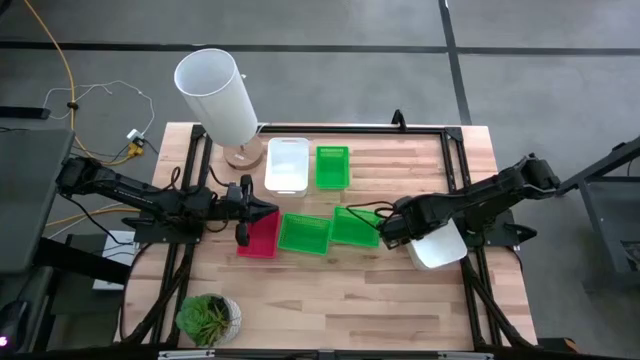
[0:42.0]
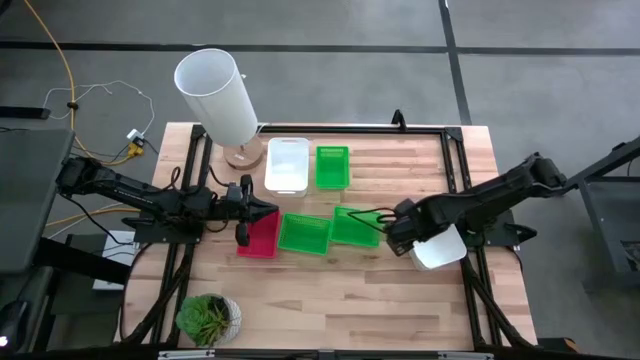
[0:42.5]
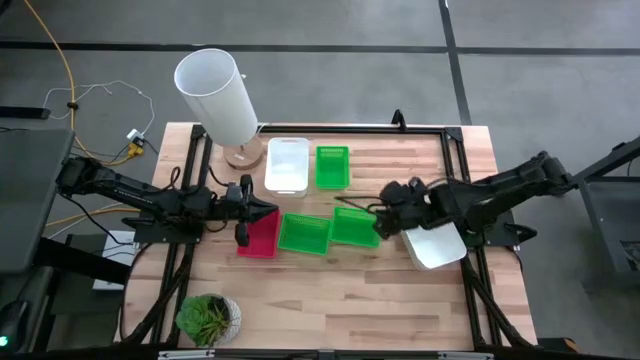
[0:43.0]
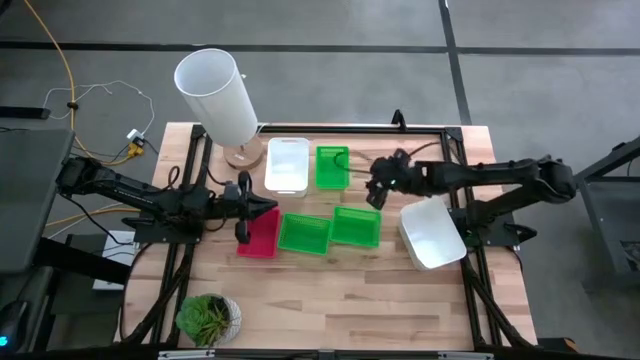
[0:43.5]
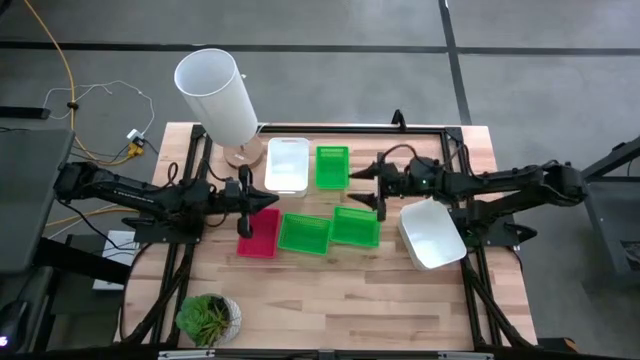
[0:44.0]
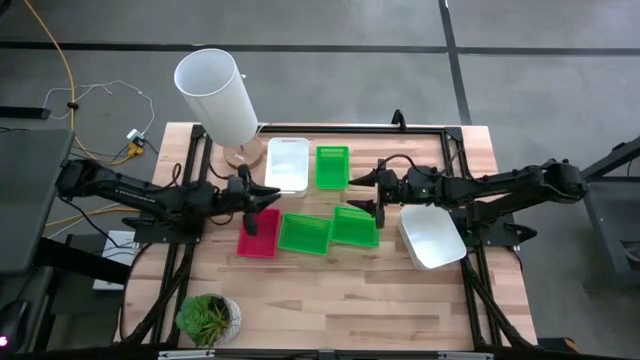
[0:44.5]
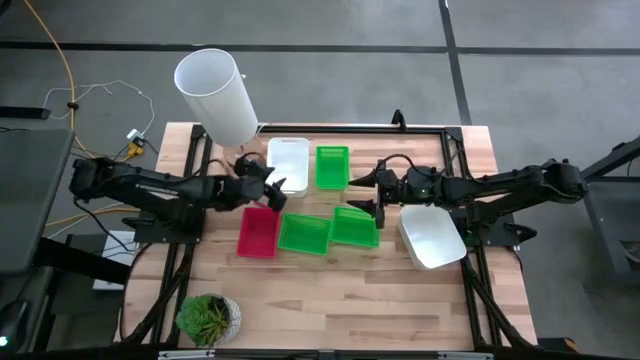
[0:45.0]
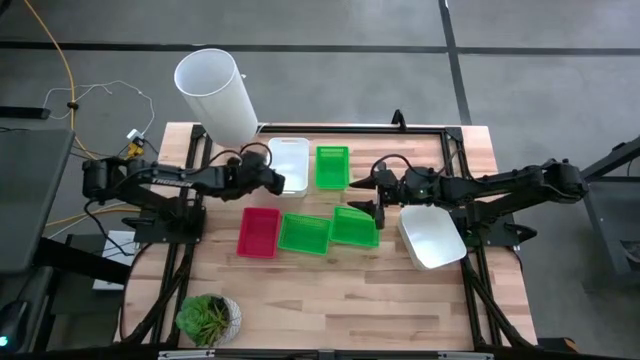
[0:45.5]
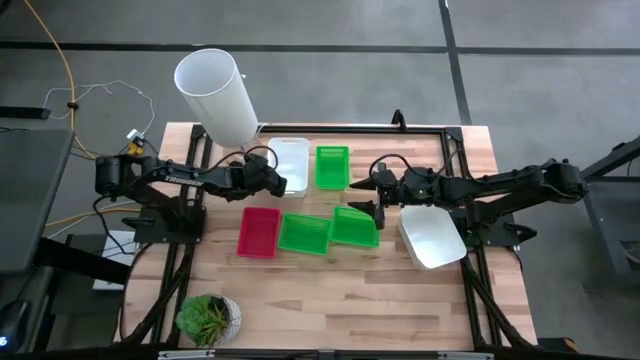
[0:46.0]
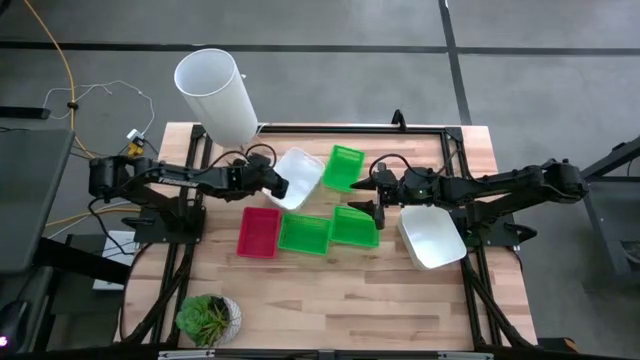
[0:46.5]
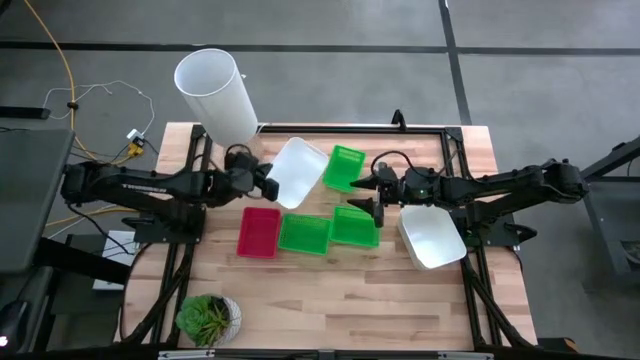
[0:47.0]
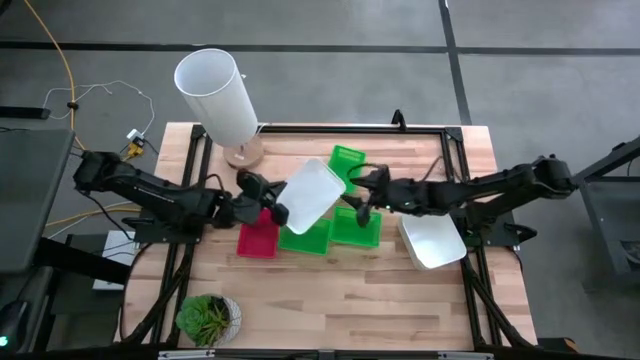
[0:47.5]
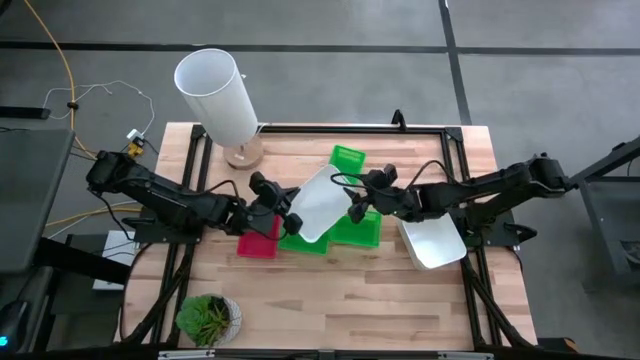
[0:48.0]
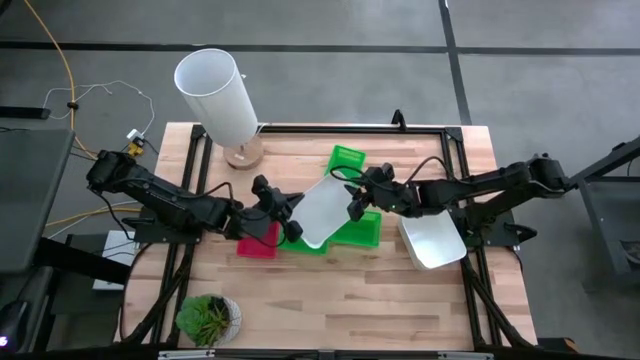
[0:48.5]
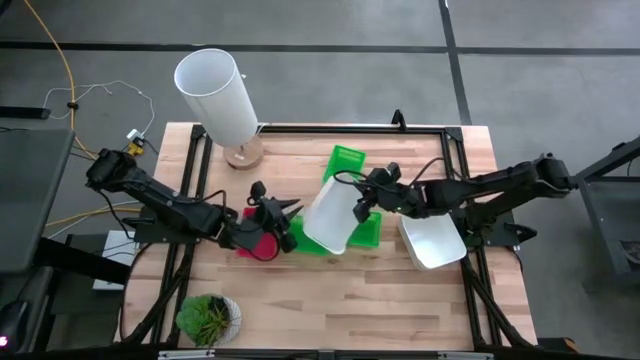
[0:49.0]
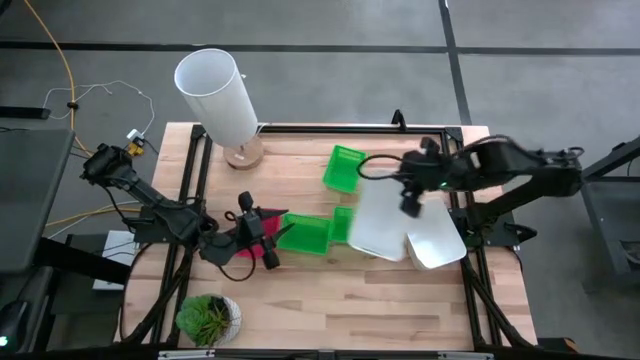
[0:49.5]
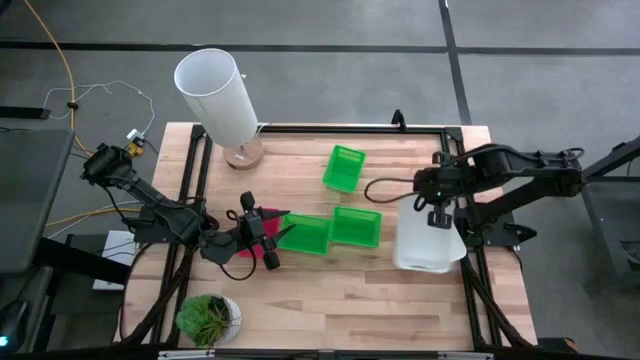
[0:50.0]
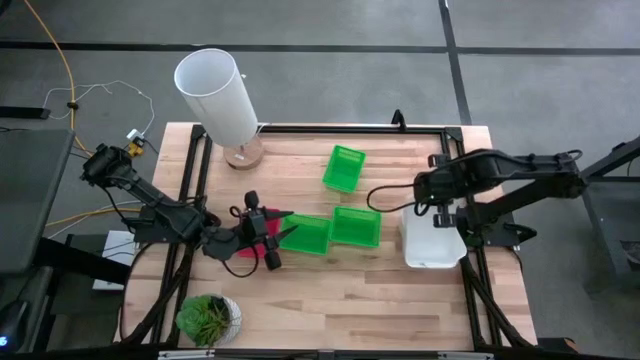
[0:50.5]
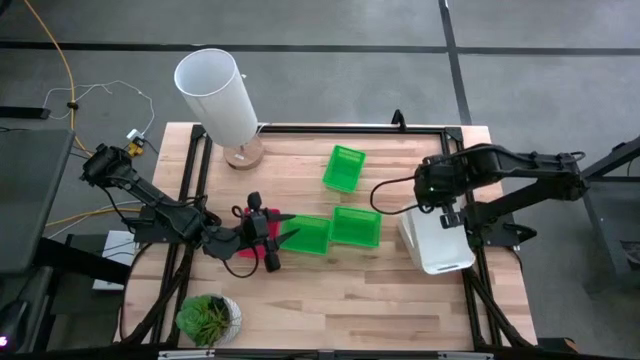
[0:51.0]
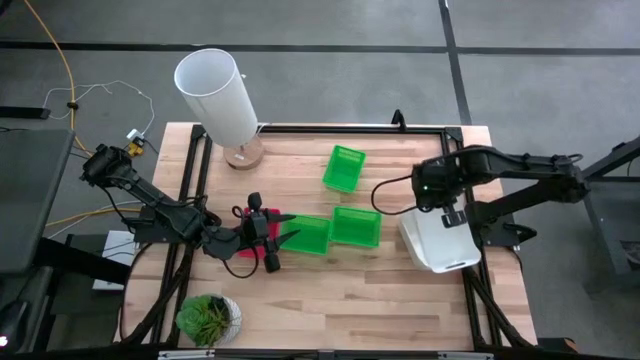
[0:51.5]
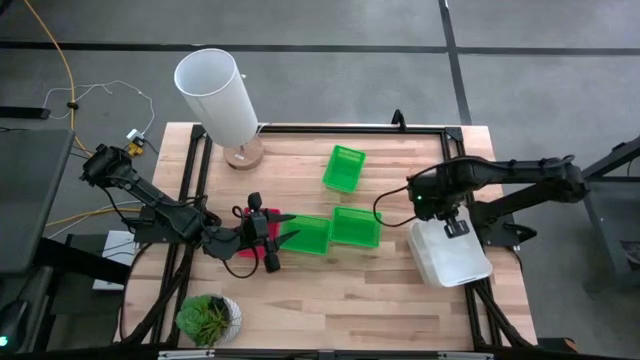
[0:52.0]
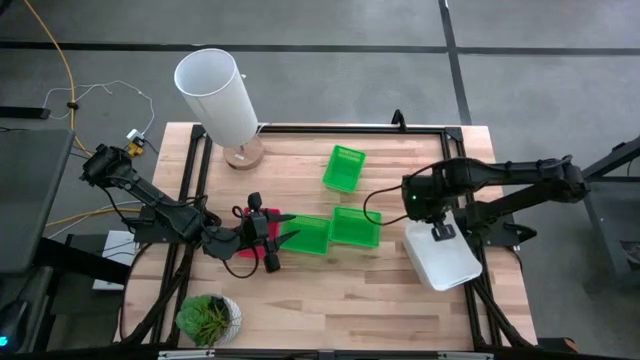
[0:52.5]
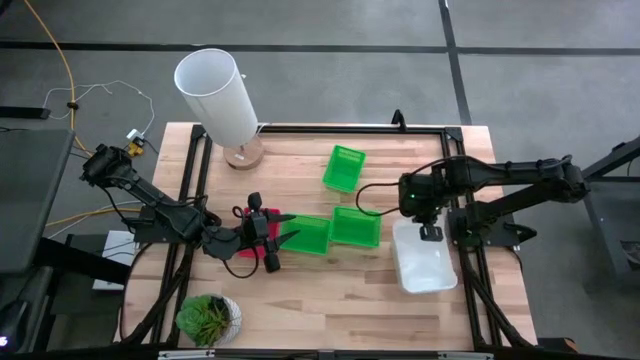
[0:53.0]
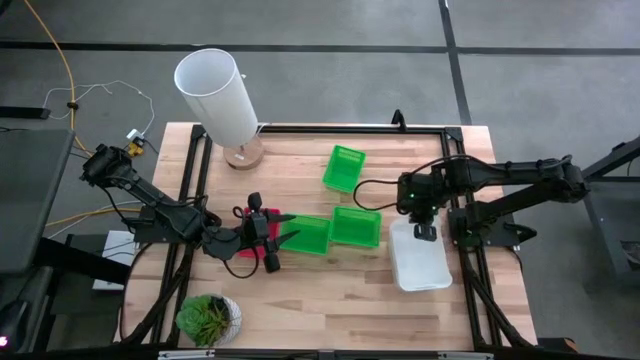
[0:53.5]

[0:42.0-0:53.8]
Stack the top white bin on top of the bottom white bin

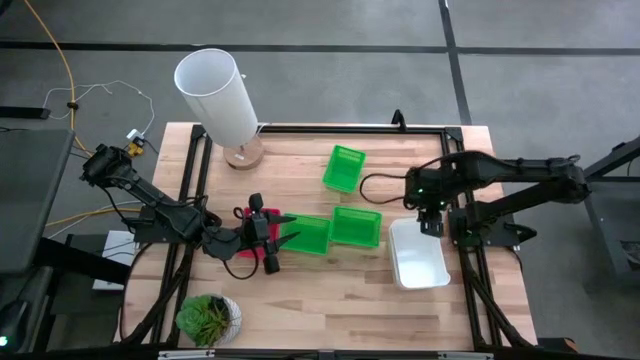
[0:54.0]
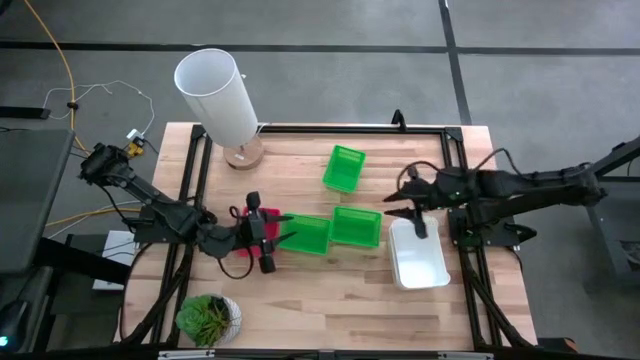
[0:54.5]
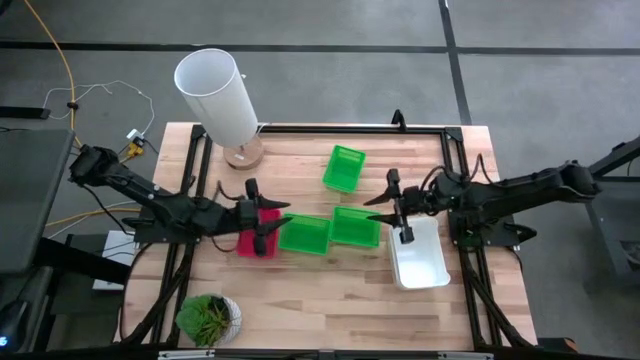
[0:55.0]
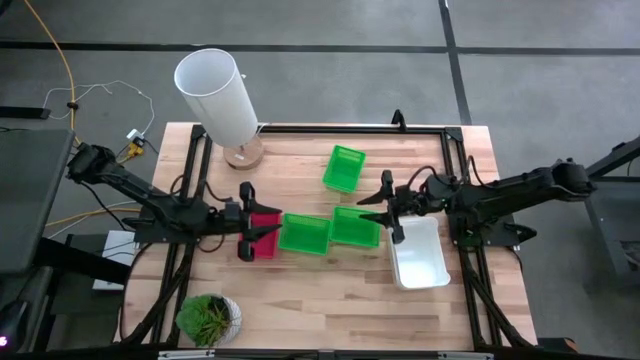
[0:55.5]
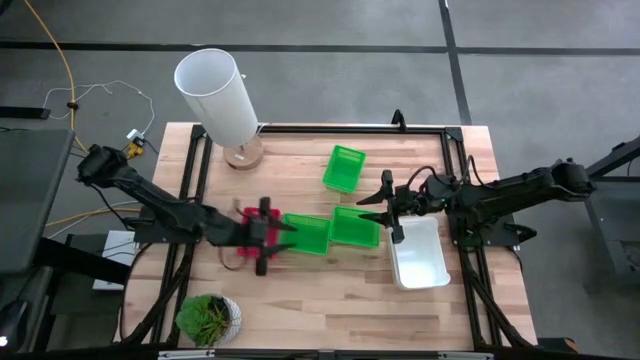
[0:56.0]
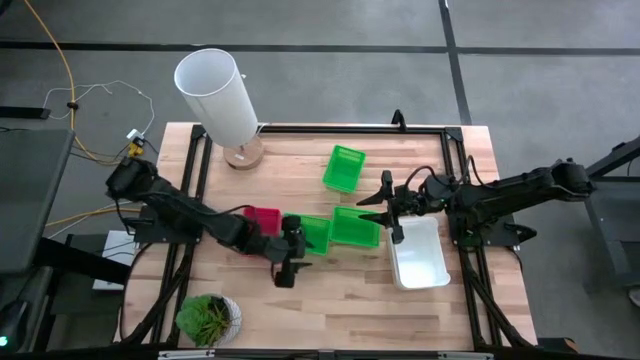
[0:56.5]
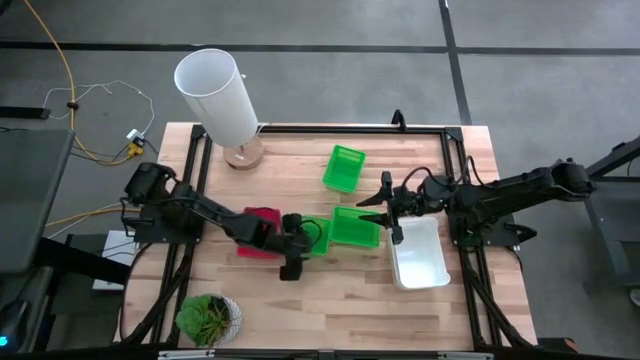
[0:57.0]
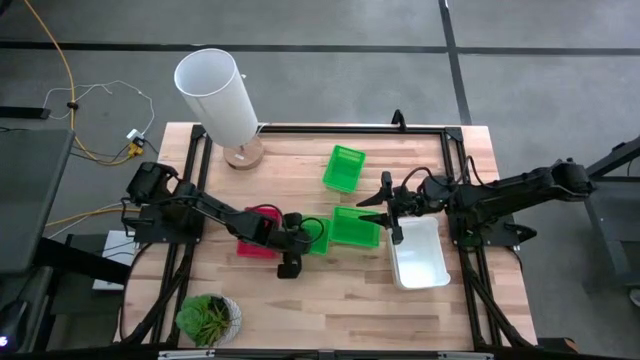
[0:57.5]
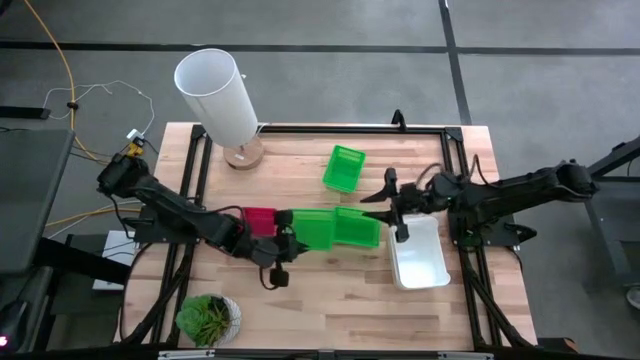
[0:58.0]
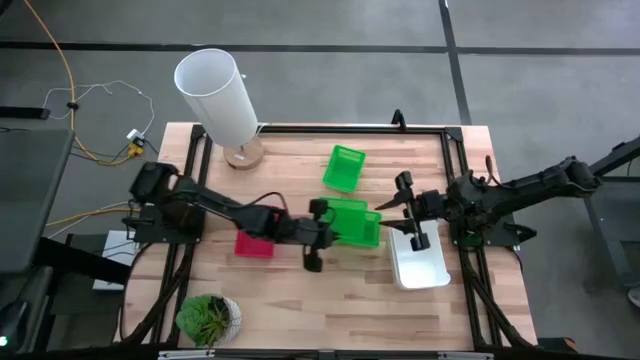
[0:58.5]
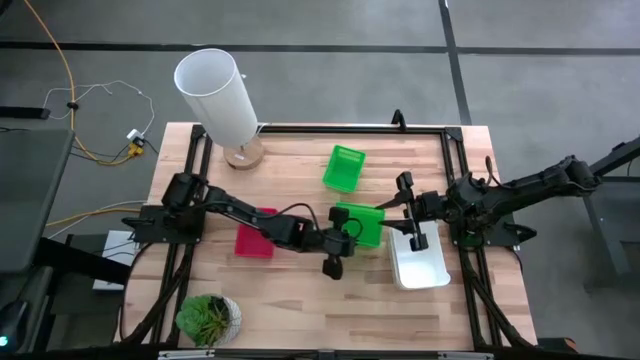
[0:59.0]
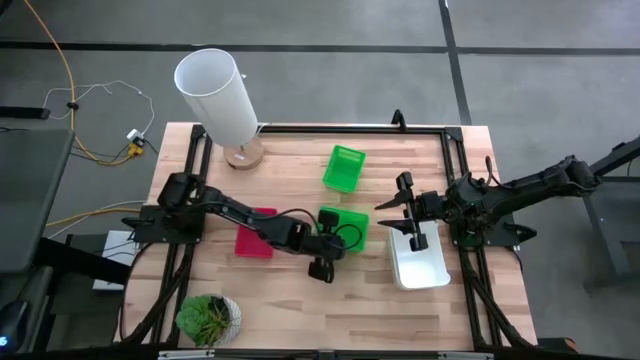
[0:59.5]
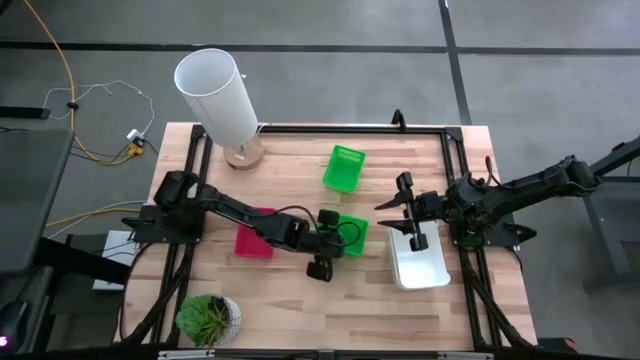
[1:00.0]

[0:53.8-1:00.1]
Stack the bottom left green bin on top of the bottom right green bin
